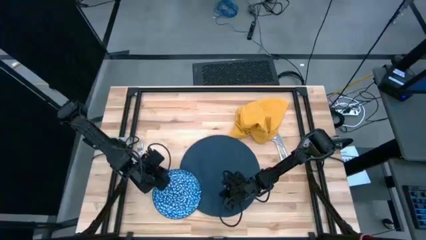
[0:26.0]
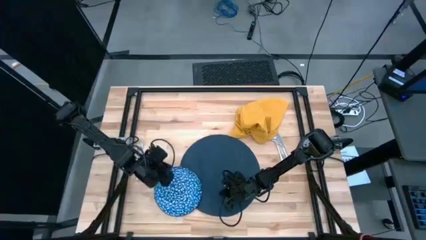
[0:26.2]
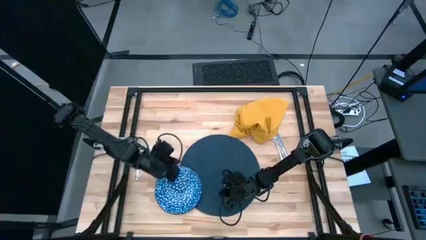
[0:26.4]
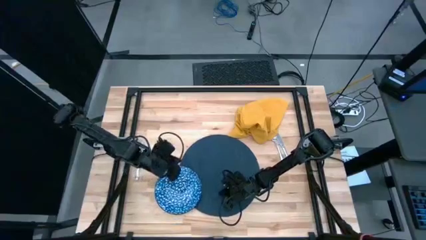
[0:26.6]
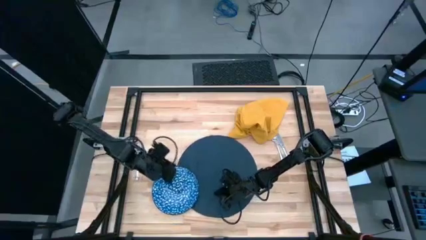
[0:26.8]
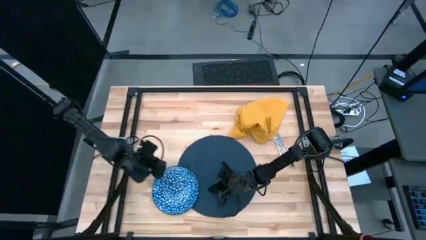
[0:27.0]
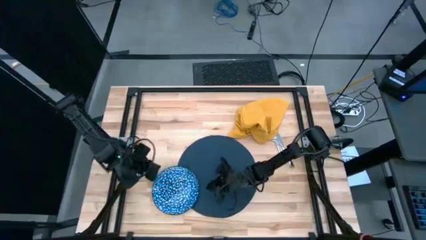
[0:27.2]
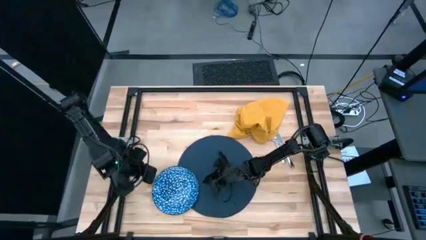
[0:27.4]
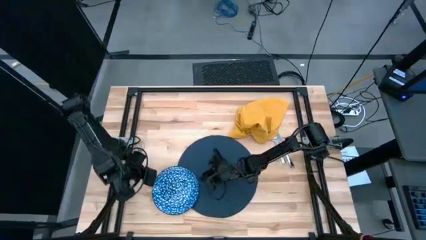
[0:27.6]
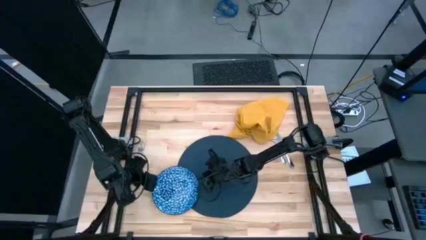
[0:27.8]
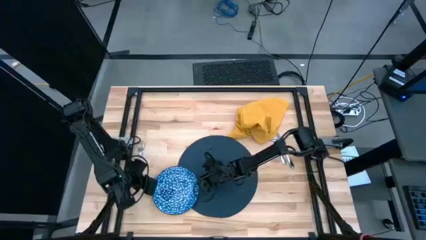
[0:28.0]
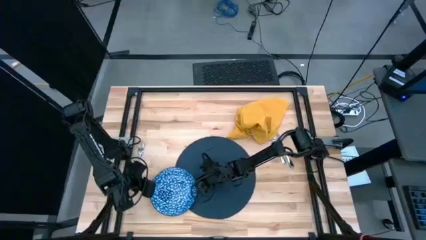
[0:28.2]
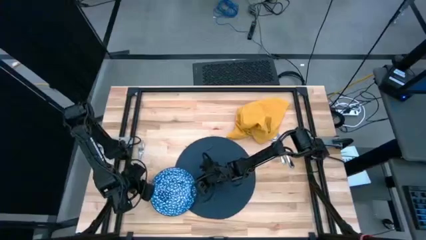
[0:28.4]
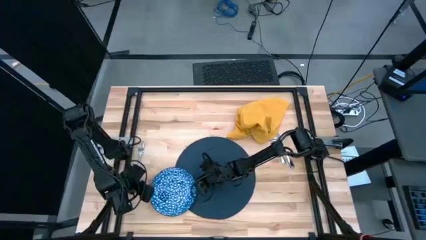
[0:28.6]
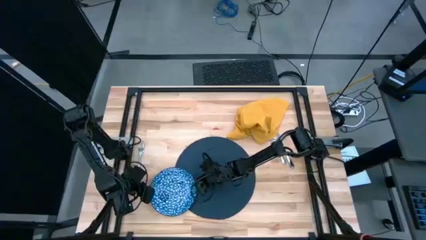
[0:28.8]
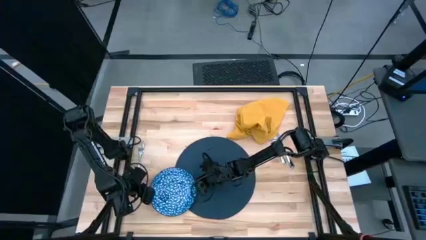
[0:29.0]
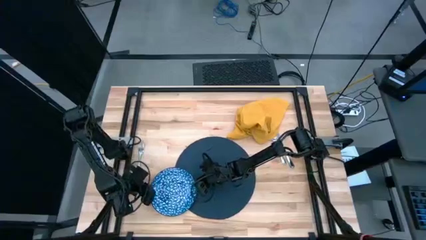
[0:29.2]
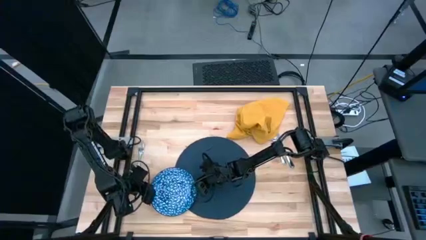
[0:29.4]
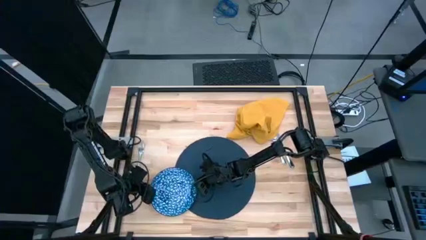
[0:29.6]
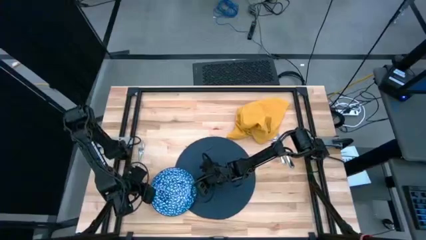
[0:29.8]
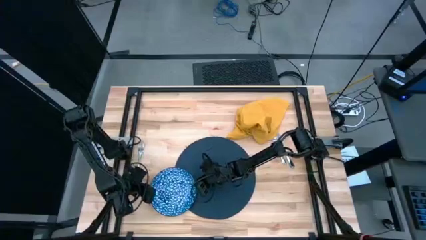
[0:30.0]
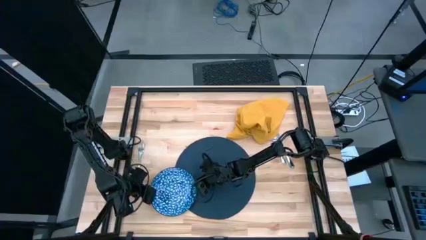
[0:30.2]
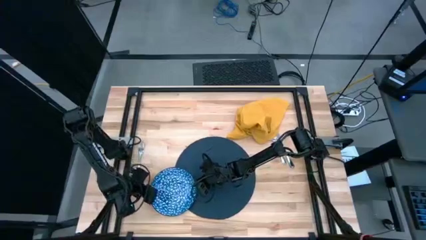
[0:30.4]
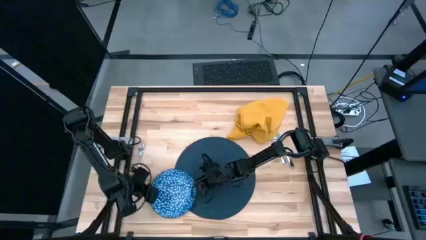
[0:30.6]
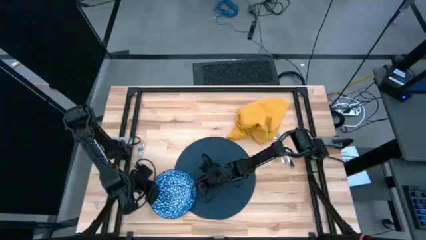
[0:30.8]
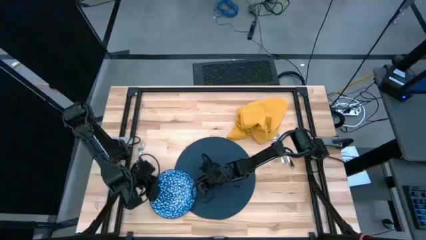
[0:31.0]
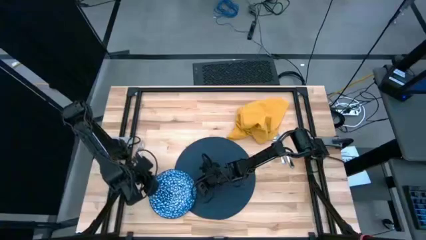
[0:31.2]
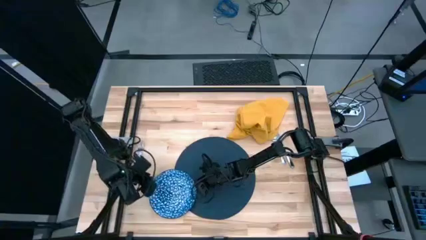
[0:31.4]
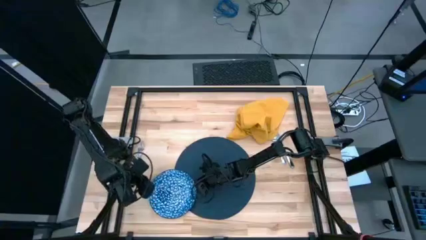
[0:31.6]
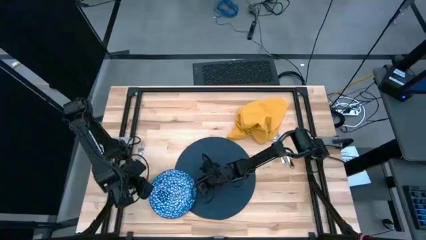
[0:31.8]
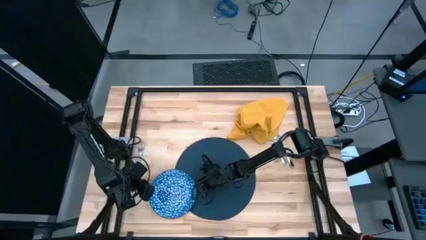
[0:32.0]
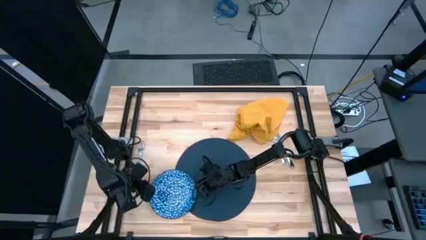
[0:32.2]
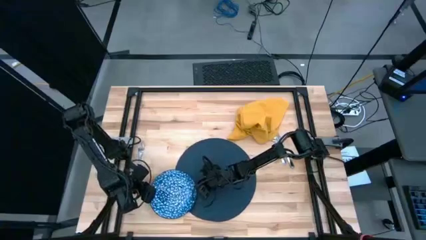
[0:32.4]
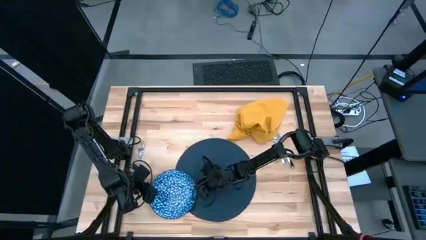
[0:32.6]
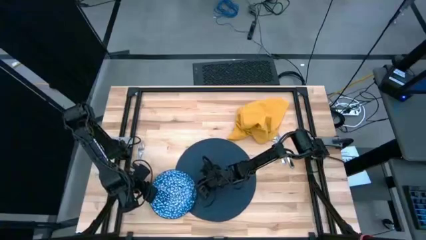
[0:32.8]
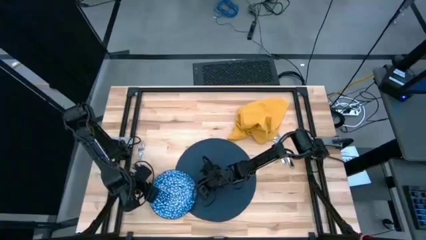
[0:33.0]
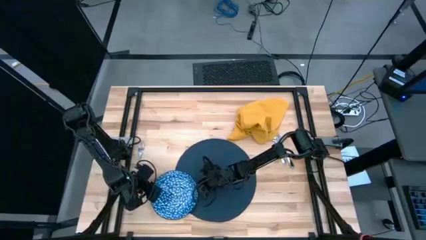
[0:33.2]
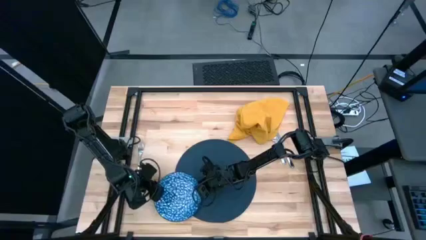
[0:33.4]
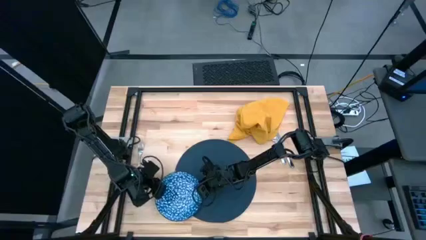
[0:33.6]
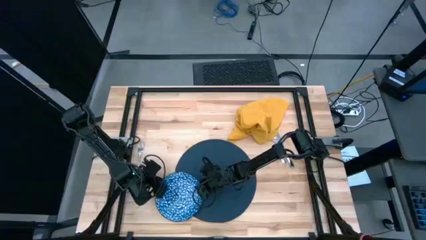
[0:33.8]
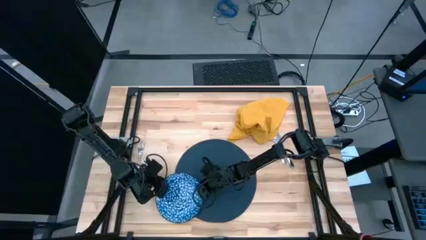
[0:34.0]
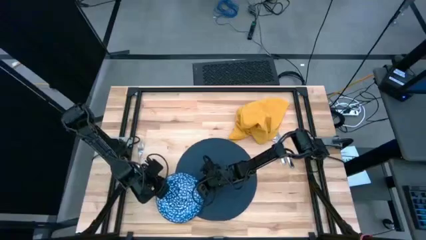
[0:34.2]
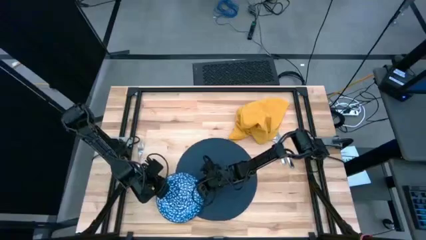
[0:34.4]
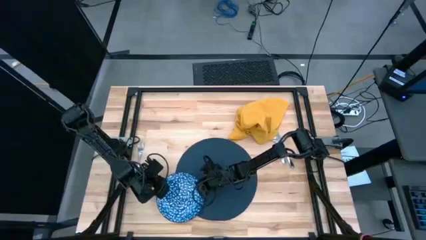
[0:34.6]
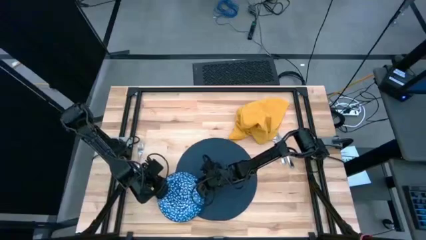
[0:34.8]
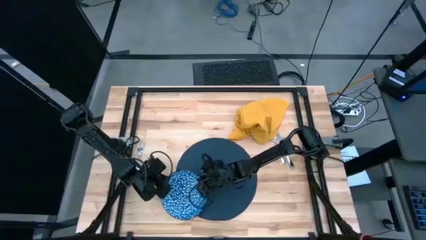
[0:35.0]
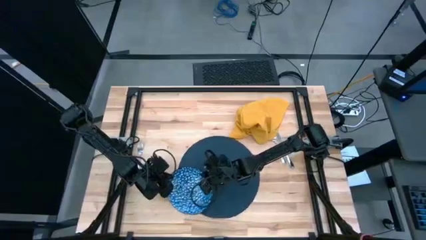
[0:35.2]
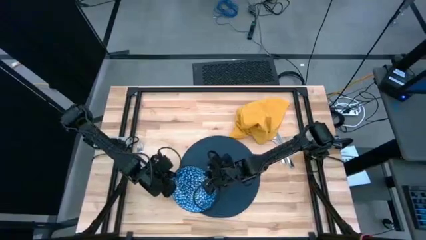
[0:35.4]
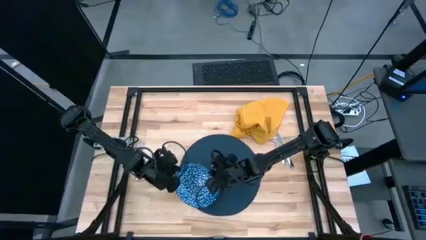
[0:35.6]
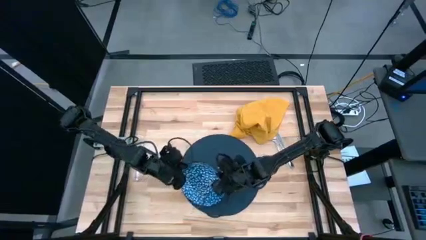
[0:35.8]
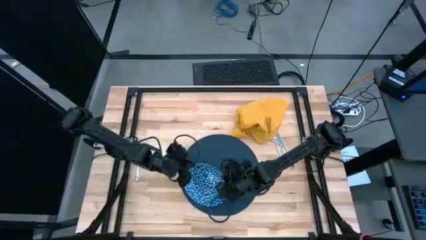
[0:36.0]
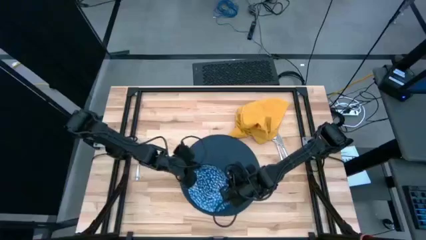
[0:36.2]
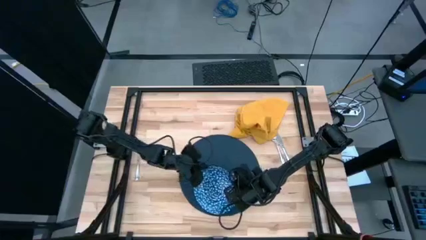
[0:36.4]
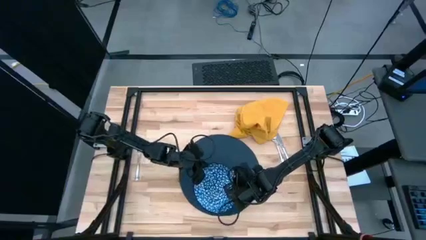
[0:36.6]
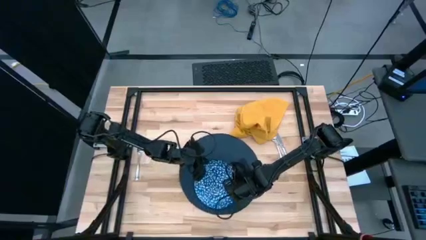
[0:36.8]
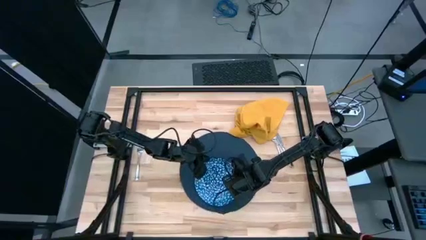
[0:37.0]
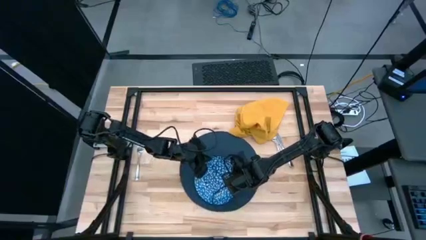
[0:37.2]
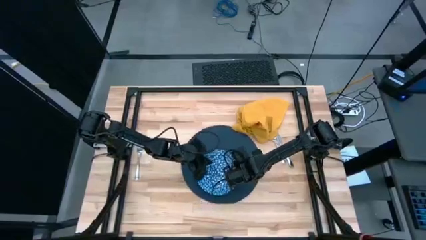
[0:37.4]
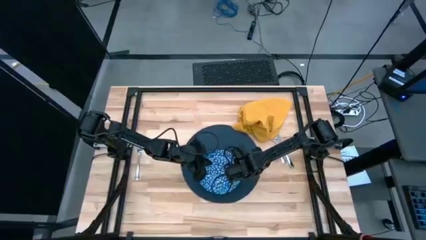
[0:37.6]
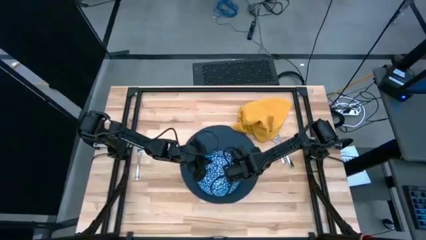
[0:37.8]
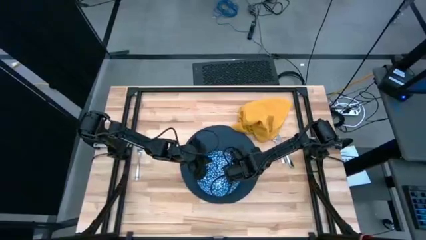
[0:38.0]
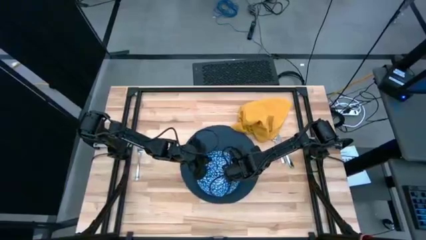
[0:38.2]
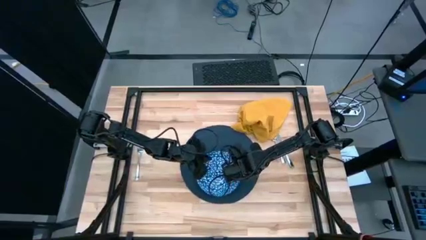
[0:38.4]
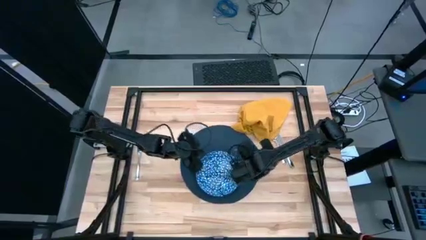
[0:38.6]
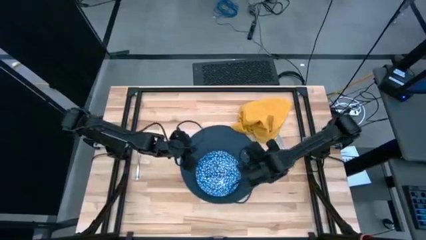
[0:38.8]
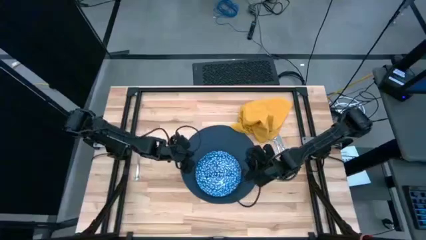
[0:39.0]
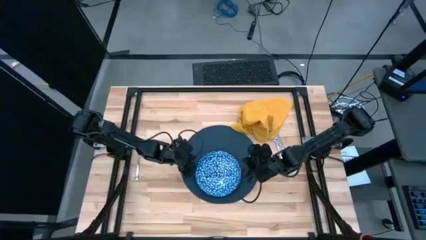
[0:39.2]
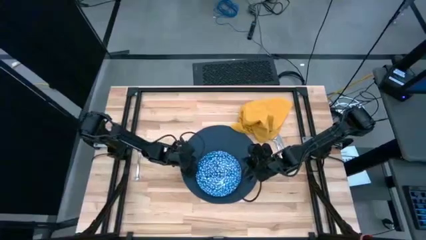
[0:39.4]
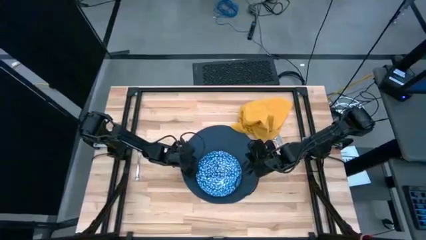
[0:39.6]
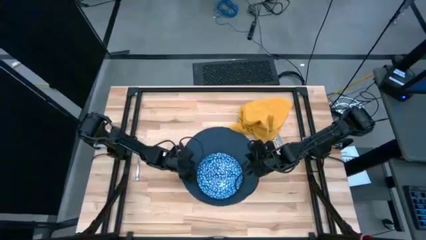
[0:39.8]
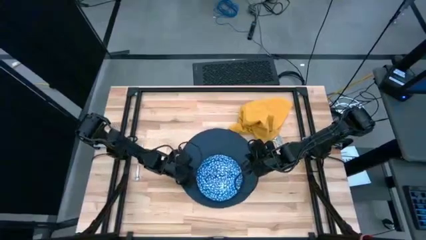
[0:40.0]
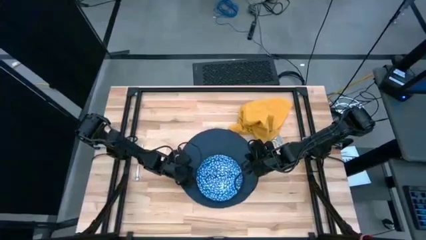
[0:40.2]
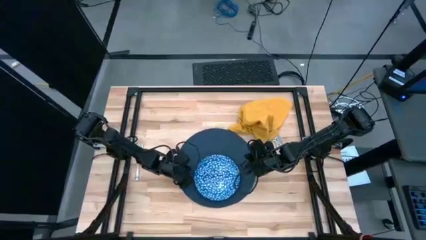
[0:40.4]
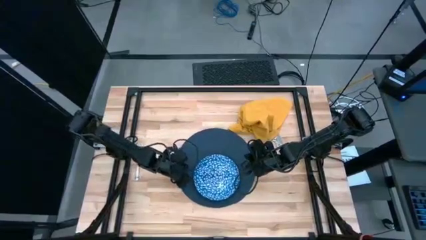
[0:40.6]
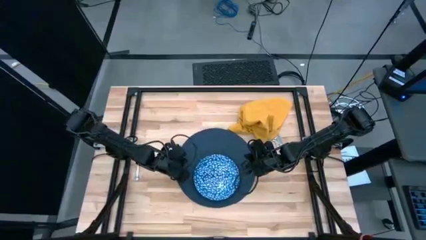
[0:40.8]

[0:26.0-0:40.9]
Task: Set table place
Put the blue plate on the blue tablemat
